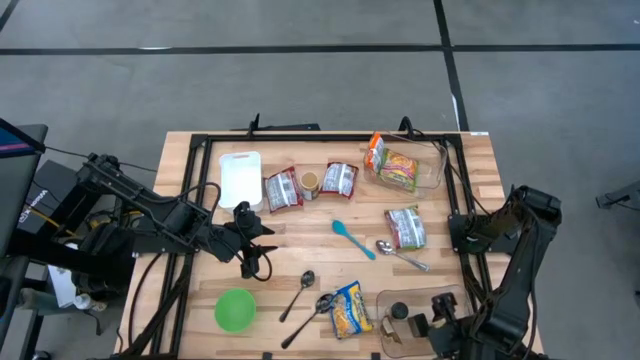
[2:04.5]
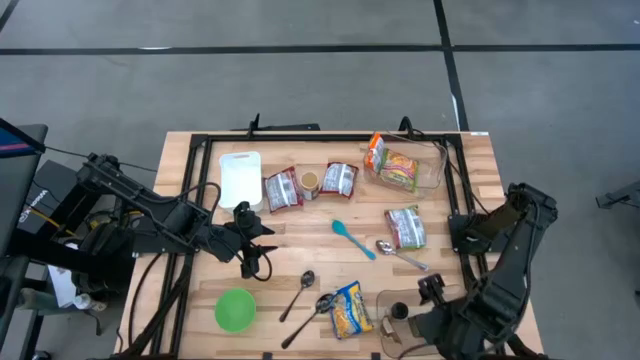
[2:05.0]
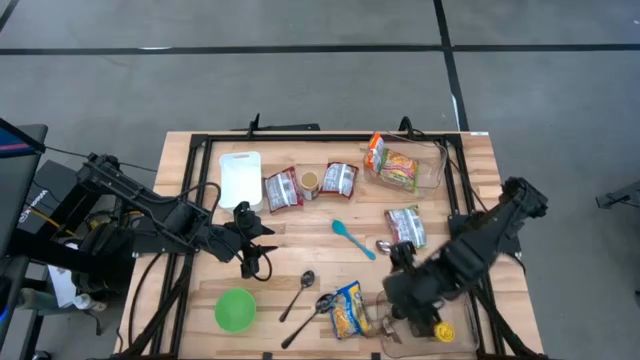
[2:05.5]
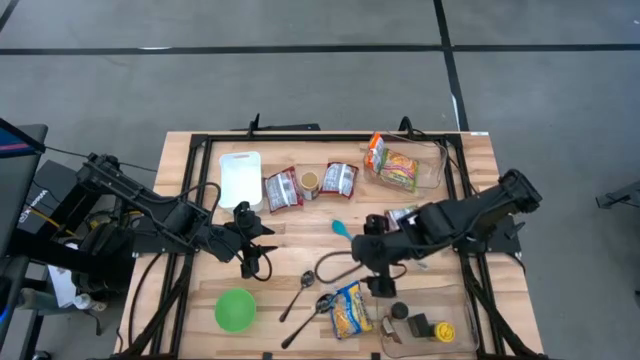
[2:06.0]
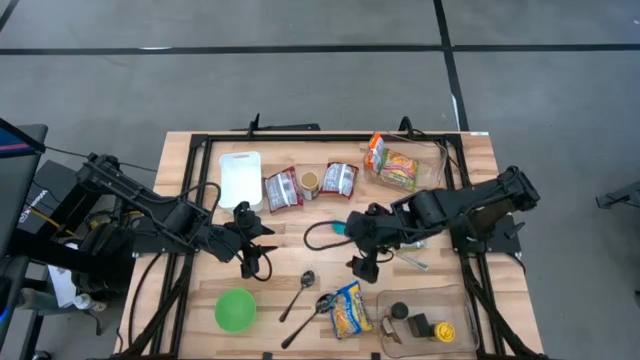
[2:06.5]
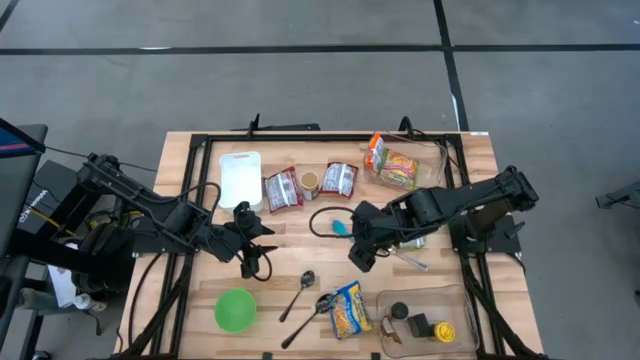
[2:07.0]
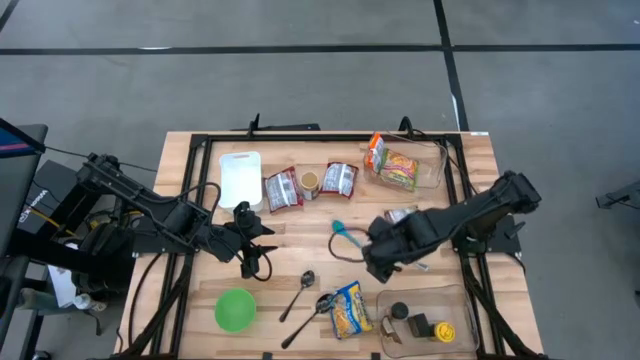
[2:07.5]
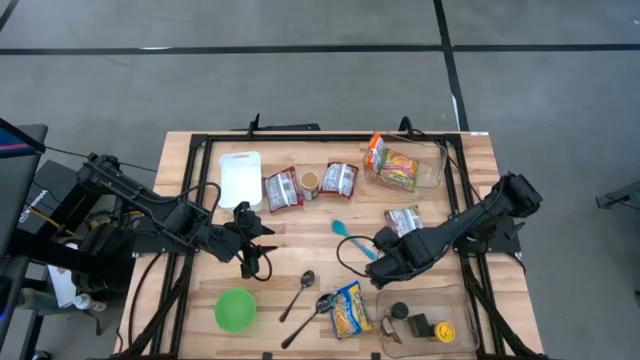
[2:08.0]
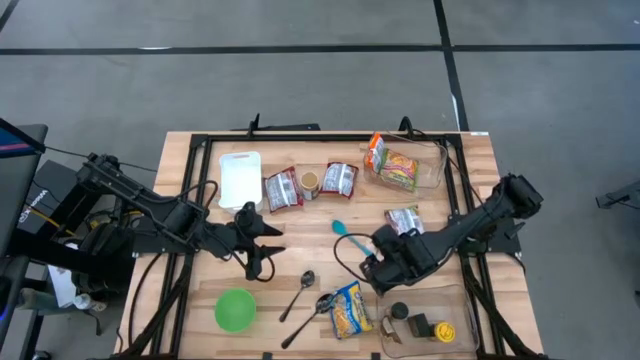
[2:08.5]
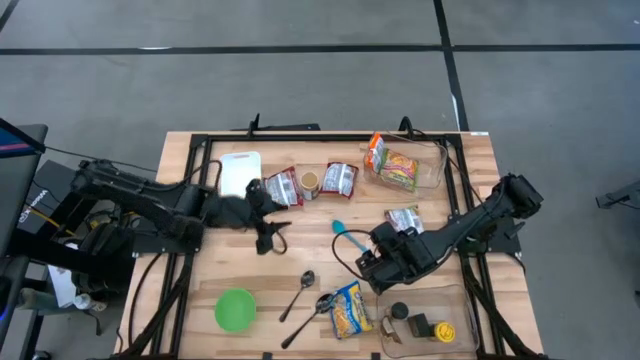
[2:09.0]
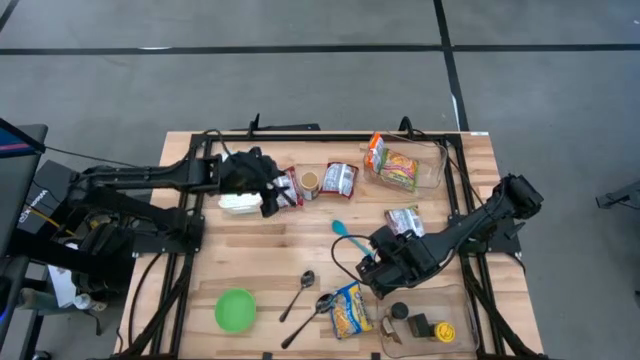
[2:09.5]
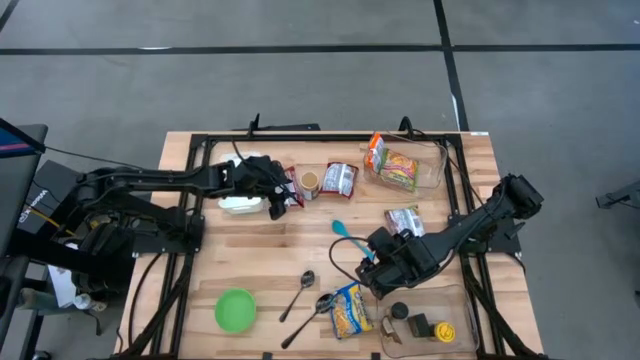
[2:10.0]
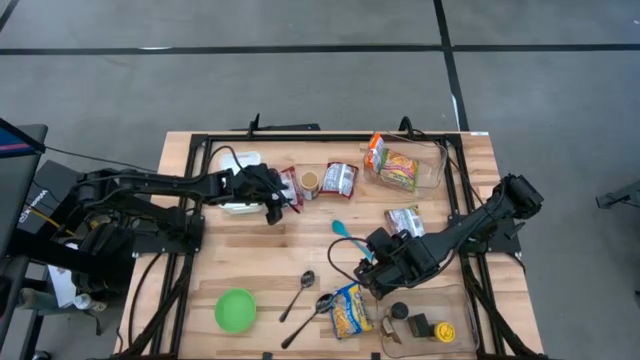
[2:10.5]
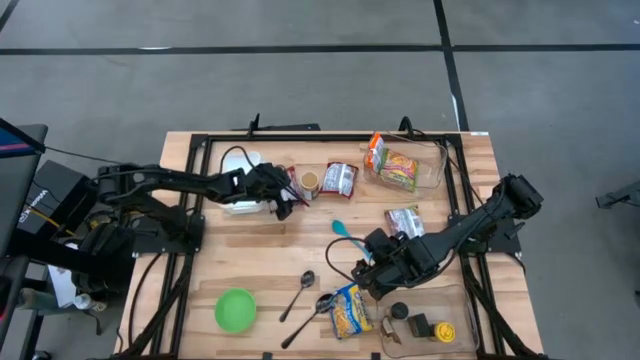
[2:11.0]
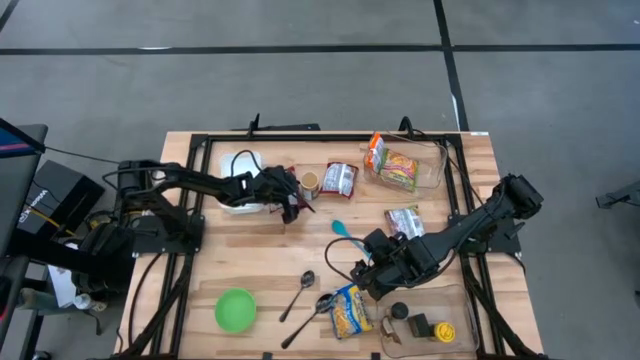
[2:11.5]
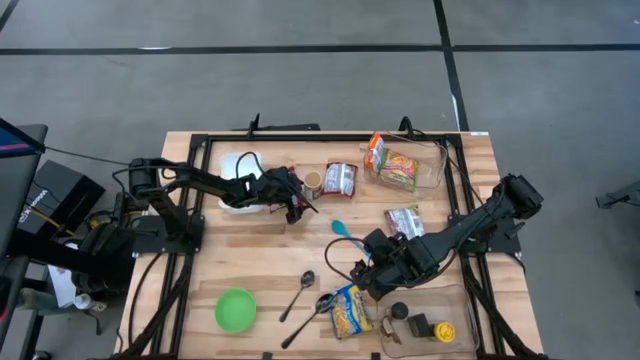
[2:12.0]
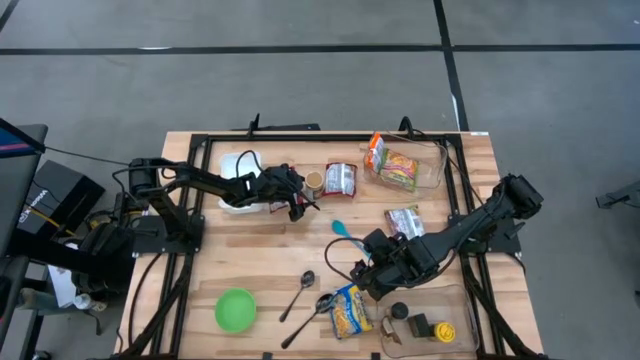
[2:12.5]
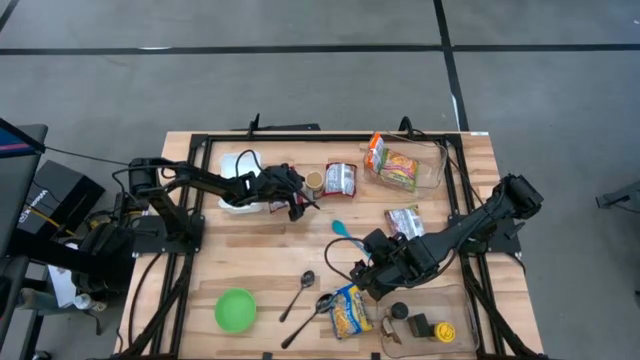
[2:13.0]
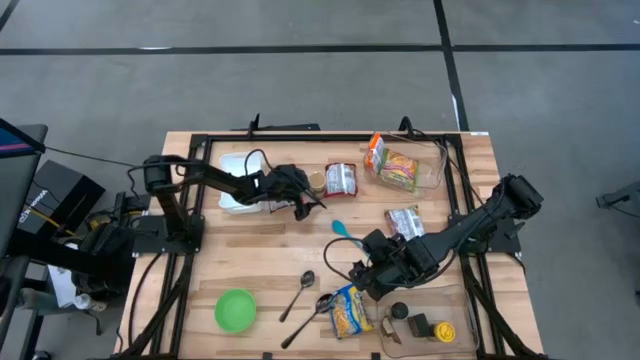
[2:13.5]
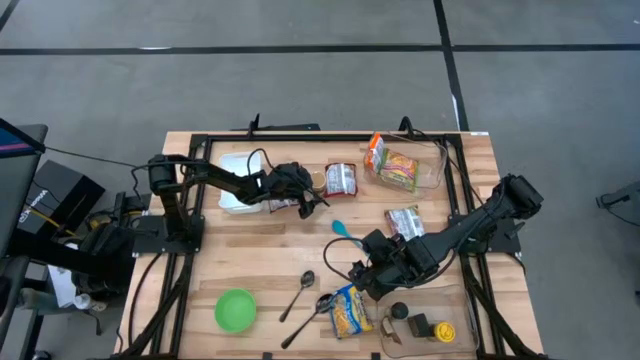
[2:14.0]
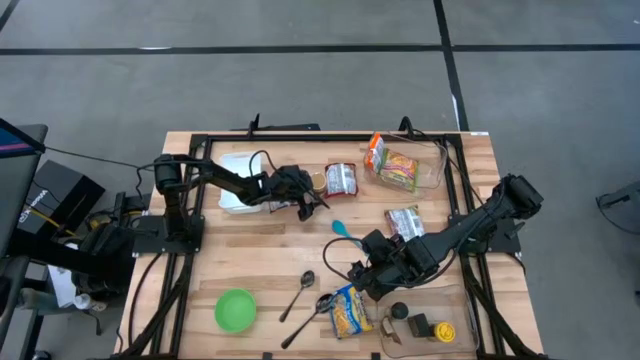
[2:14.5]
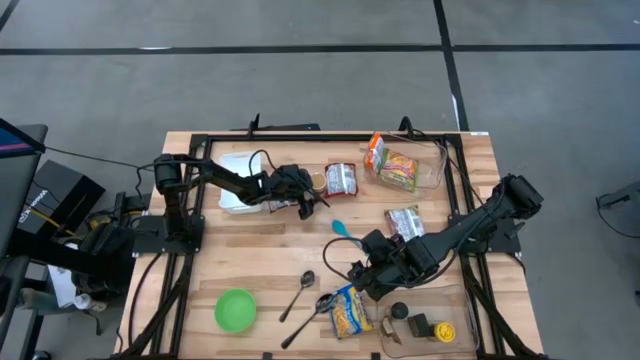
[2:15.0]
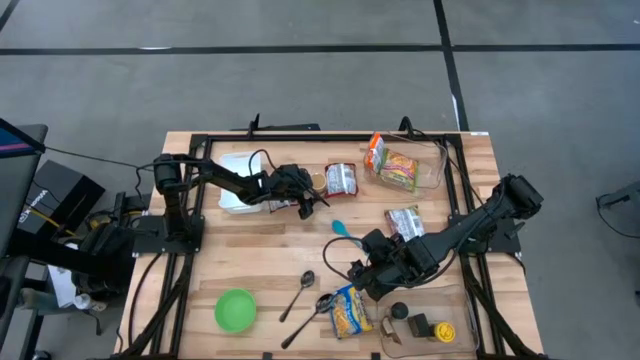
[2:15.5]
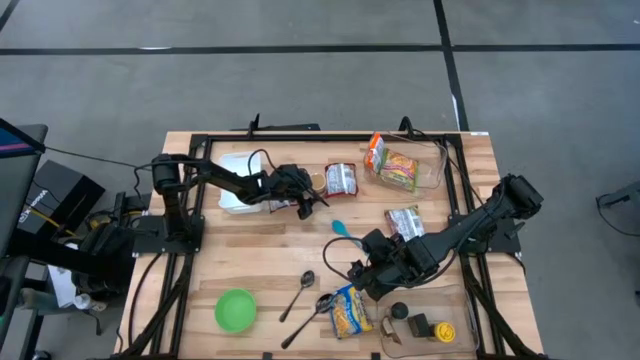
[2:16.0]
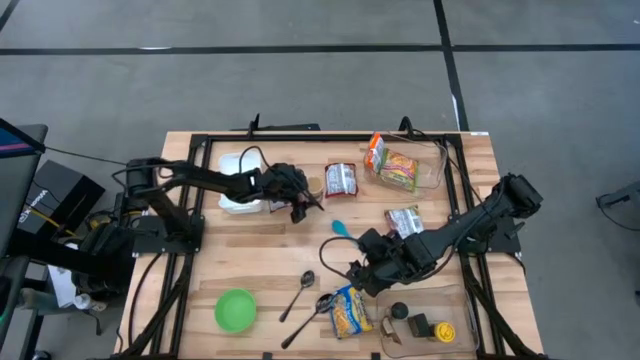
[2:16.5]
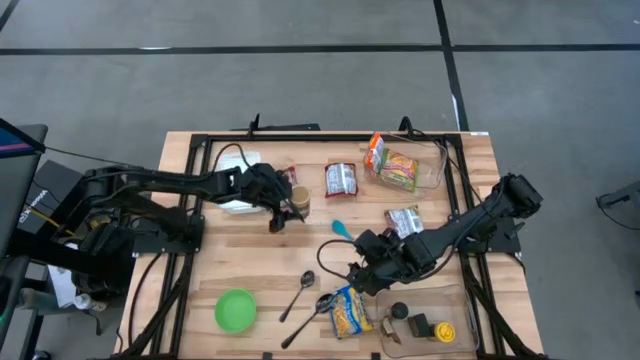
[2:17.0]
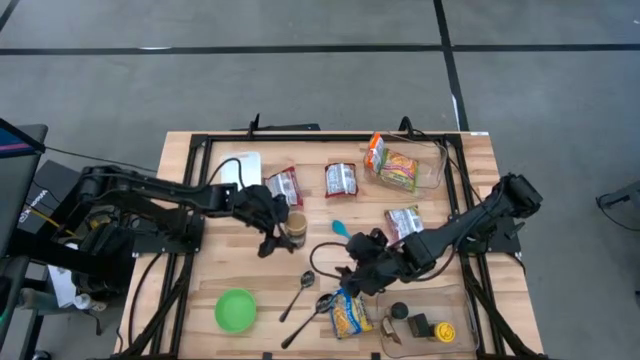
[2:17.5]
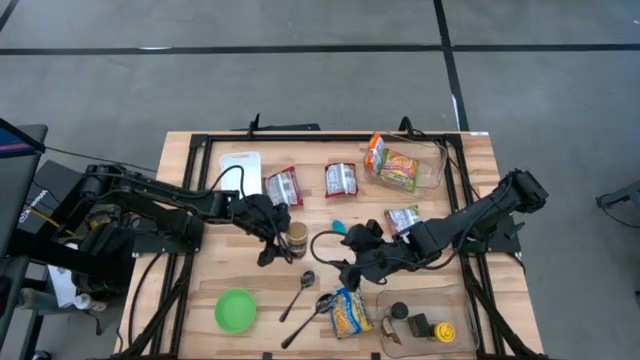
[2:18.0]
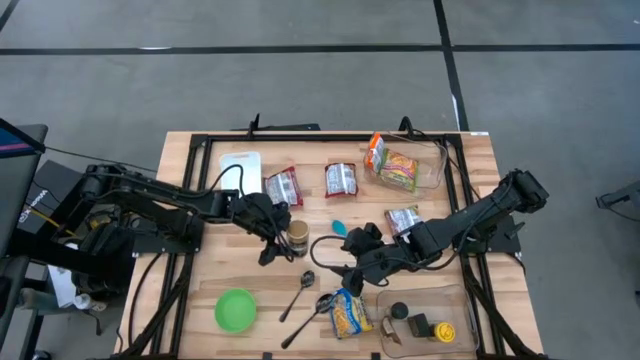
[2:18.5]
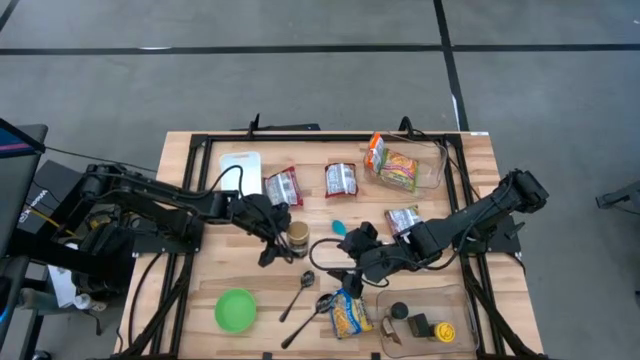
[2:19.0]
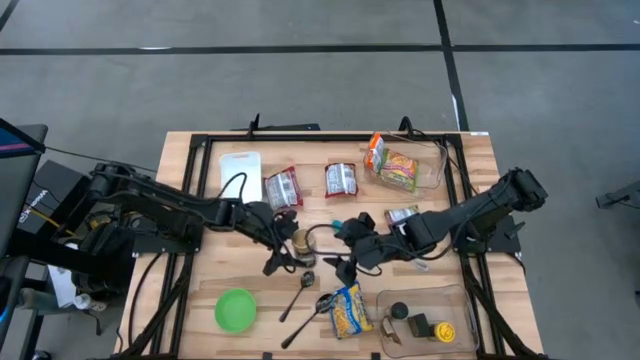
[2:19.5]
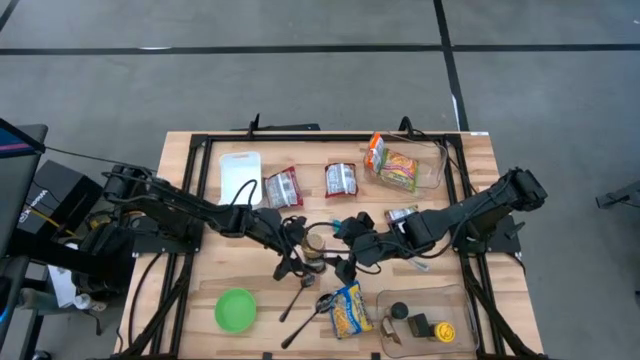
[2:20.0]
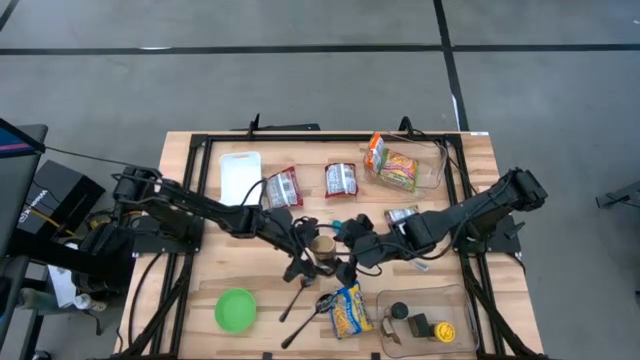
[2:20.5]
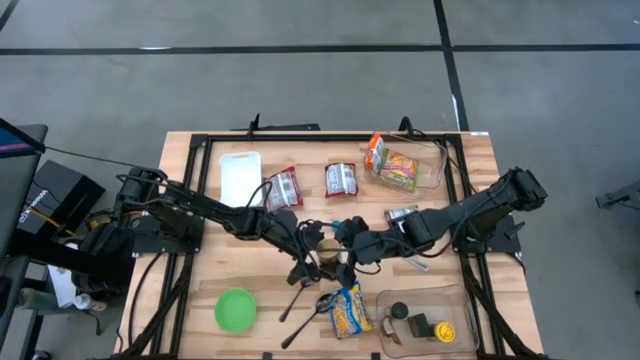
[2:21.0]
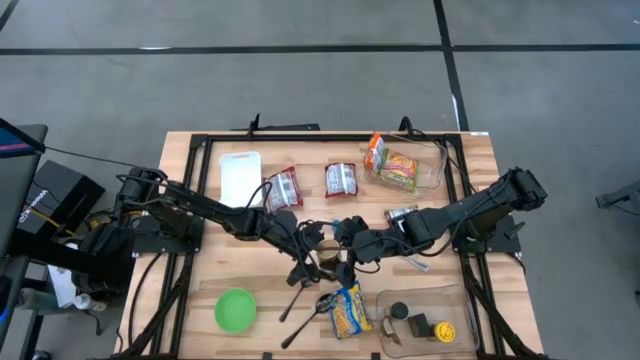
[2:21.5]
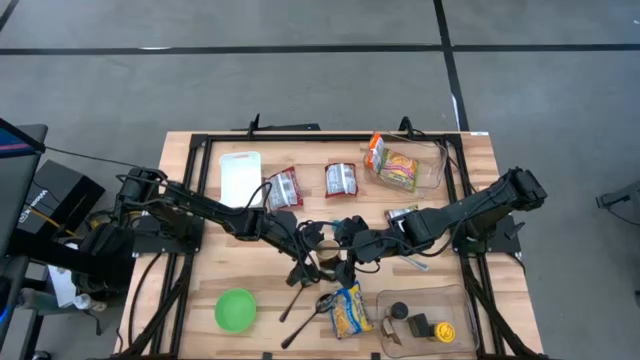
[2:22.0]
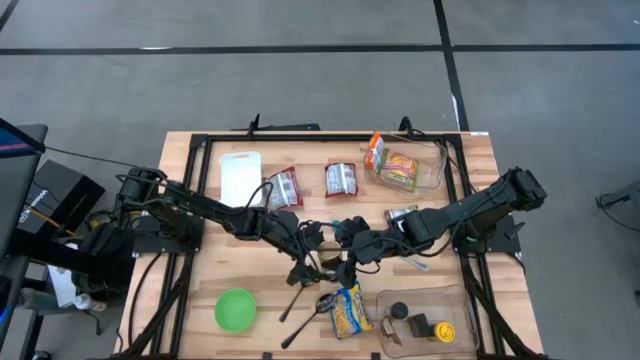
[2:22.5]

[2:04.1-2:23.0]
Task: Pick & Place Food Item
Put the golden spice bottle into the bottom transparent bin

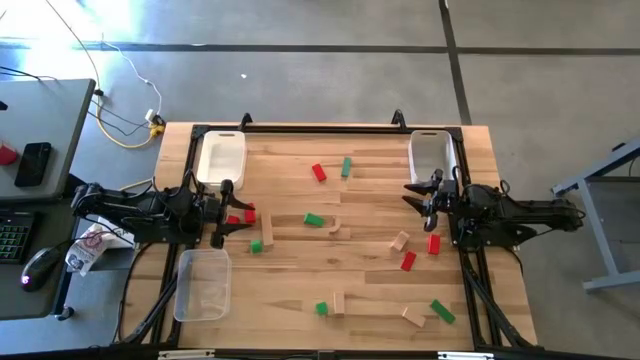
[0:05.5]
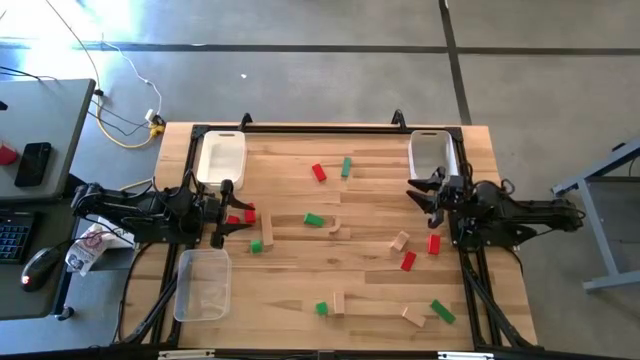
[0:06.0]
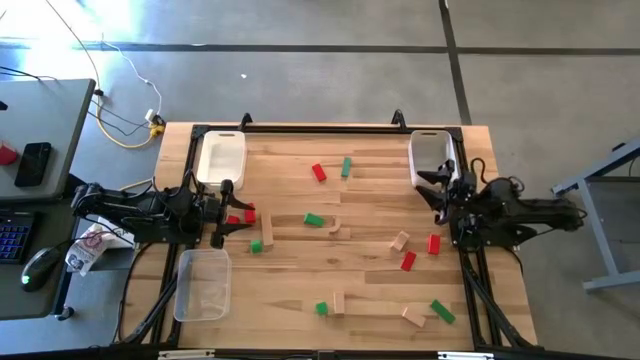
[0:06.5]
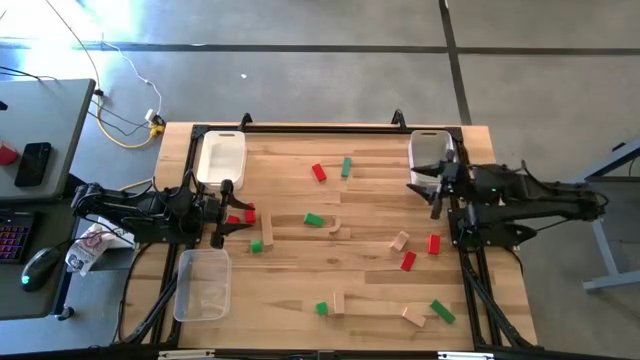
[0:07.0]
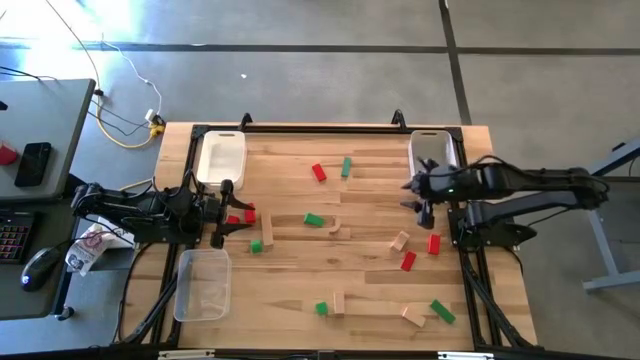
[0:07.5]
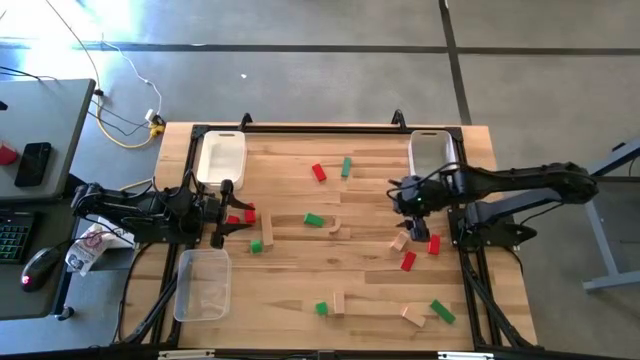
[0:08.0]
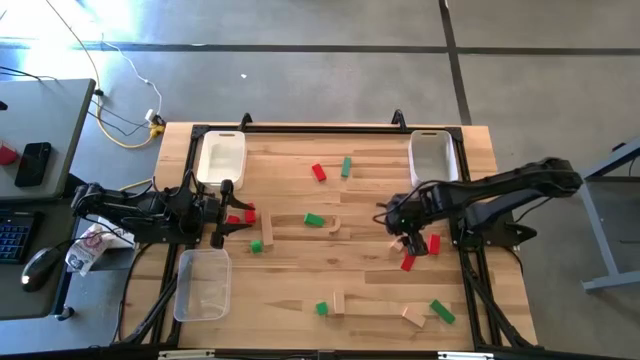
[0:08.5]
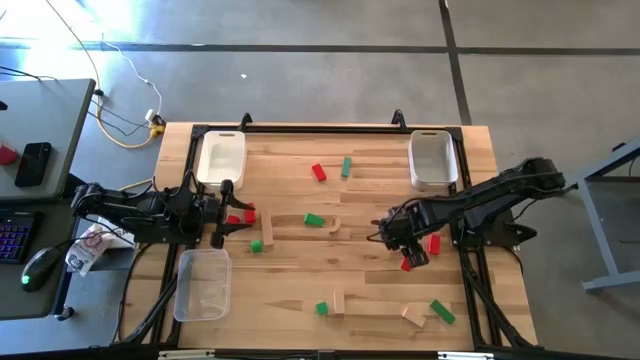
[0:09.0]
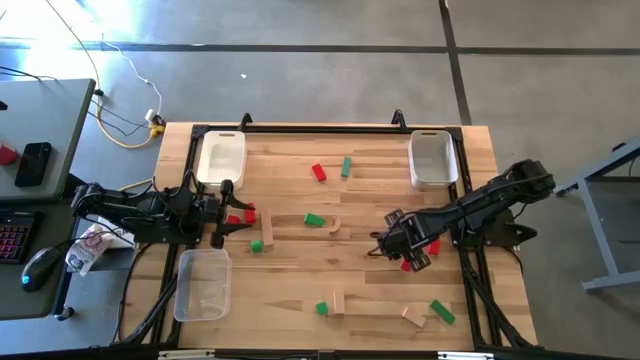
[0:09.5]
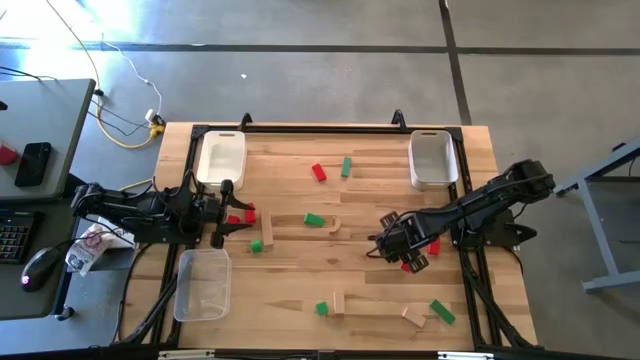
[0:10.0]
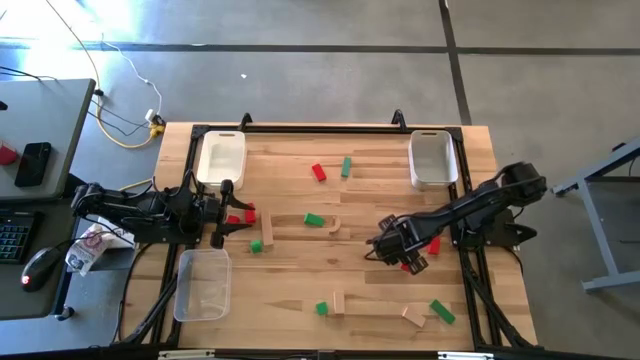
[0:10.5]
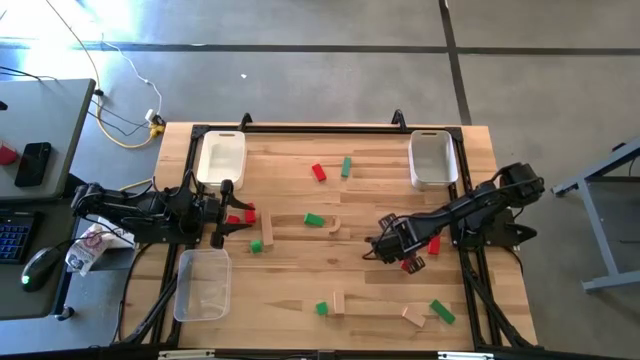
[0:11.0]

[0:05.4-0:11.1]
Task: Sort & place blocks by color
Put the light brown block into the gray bin
